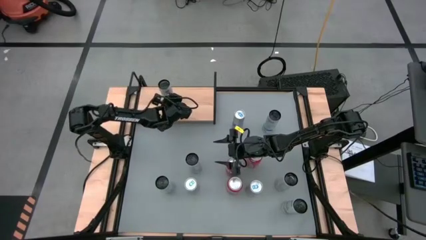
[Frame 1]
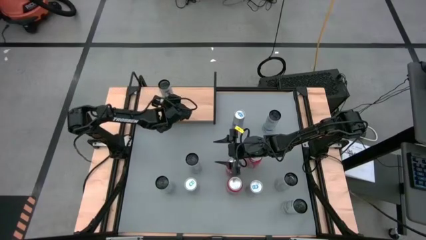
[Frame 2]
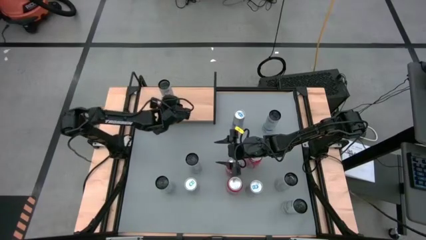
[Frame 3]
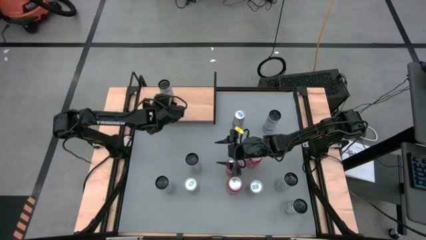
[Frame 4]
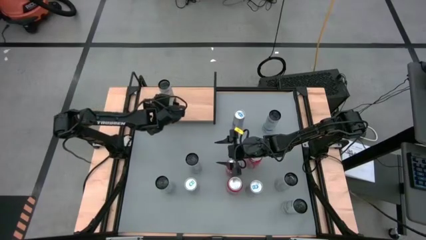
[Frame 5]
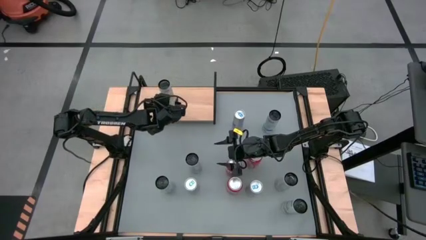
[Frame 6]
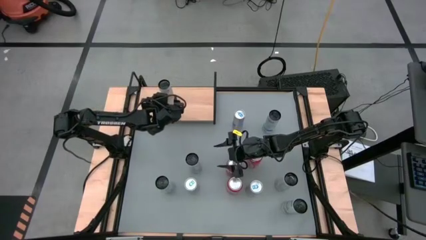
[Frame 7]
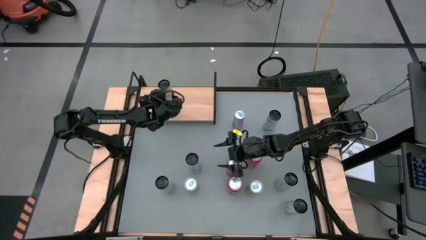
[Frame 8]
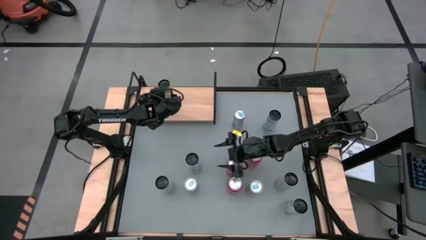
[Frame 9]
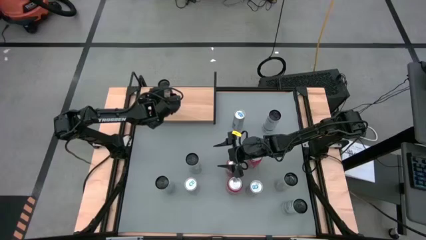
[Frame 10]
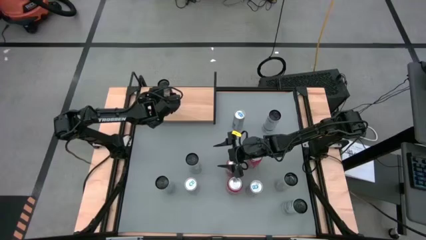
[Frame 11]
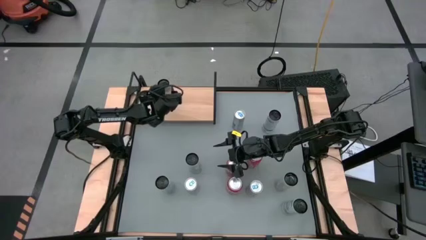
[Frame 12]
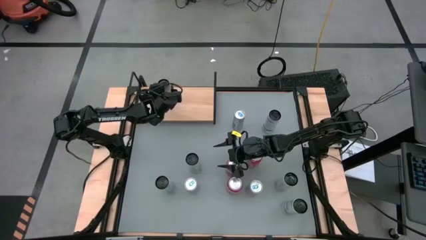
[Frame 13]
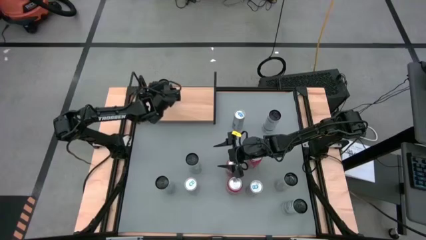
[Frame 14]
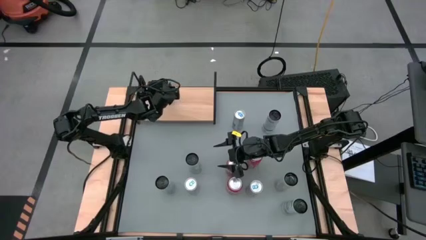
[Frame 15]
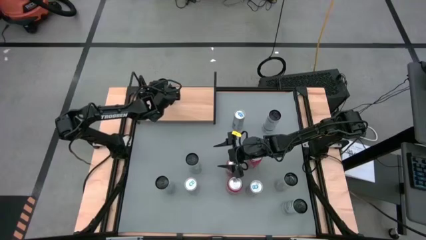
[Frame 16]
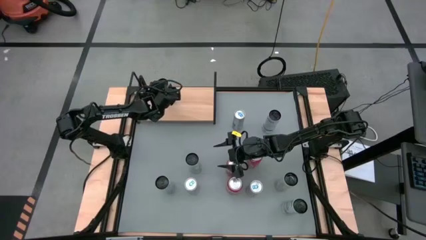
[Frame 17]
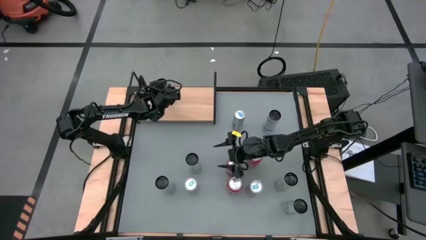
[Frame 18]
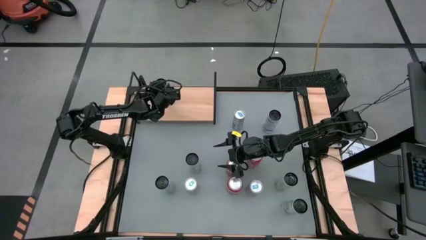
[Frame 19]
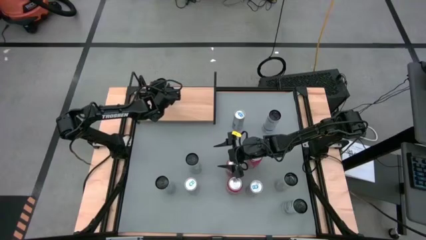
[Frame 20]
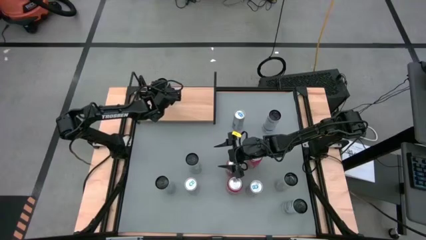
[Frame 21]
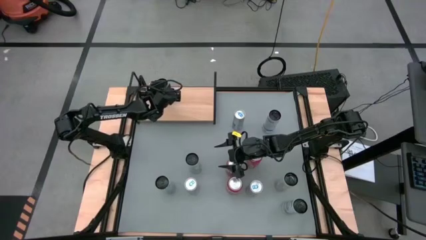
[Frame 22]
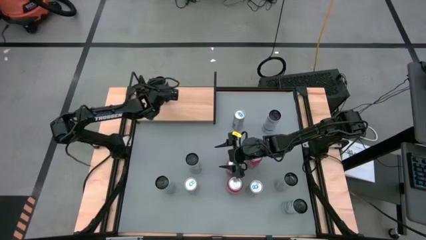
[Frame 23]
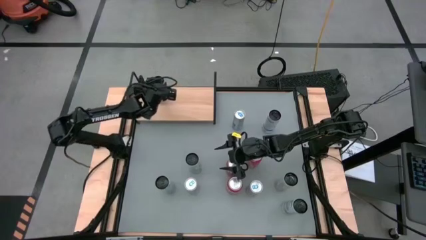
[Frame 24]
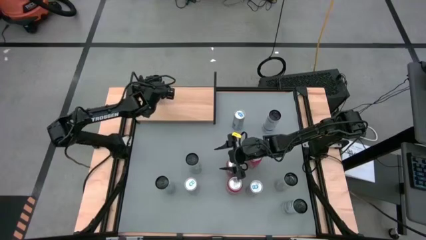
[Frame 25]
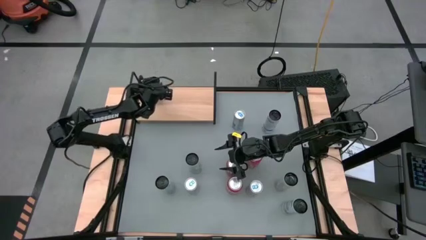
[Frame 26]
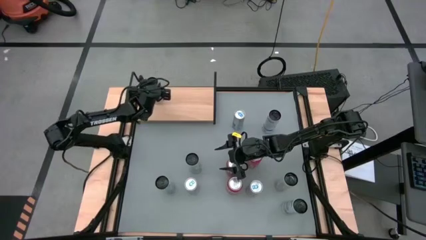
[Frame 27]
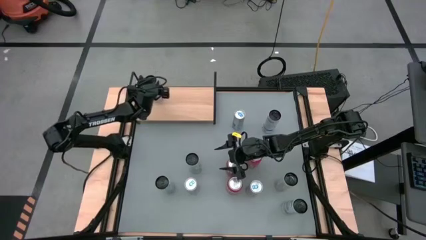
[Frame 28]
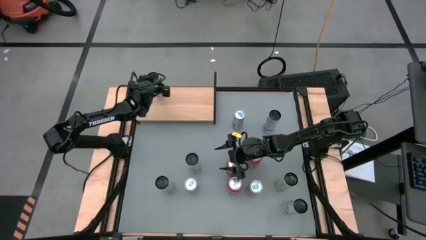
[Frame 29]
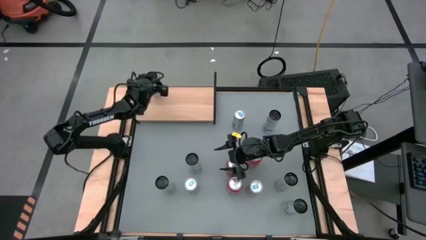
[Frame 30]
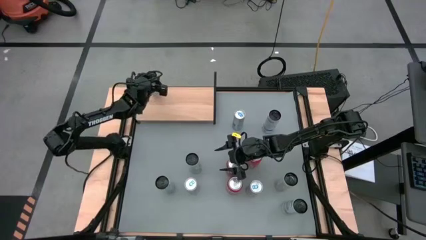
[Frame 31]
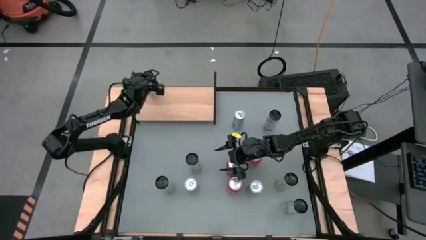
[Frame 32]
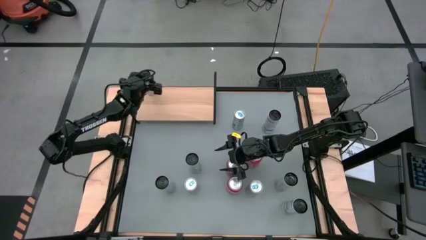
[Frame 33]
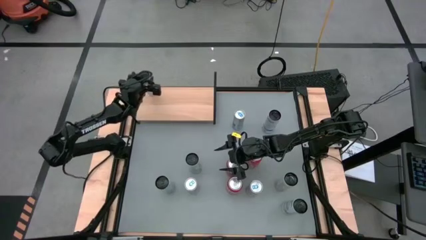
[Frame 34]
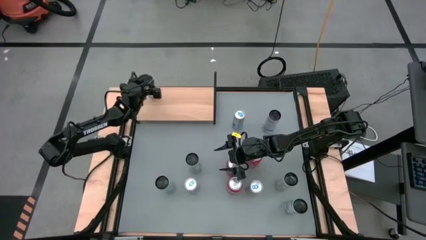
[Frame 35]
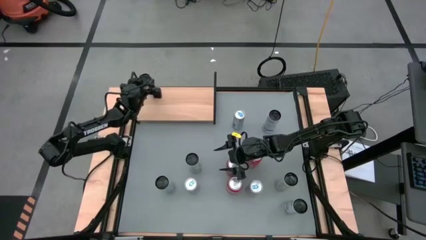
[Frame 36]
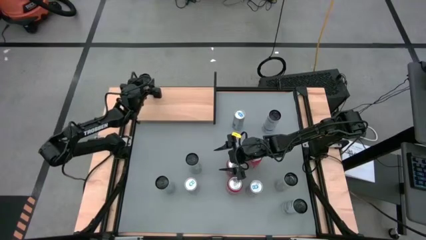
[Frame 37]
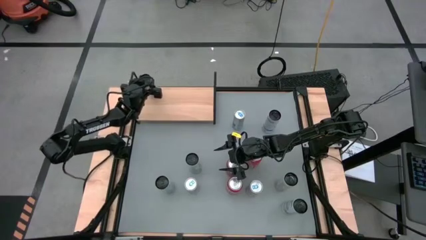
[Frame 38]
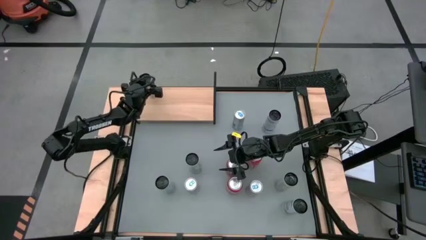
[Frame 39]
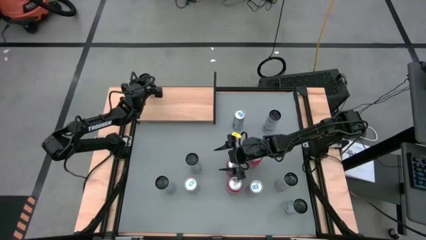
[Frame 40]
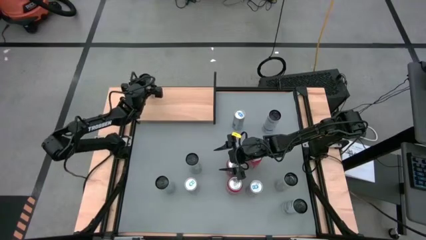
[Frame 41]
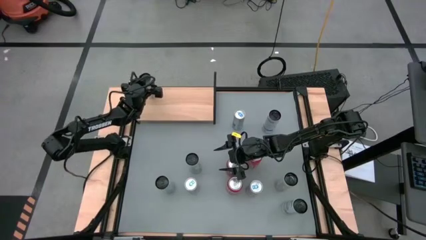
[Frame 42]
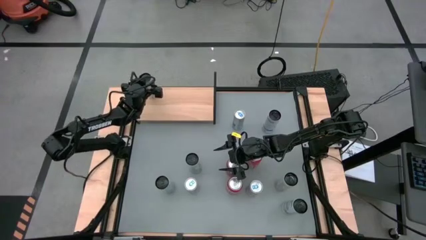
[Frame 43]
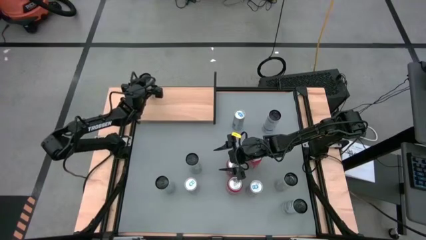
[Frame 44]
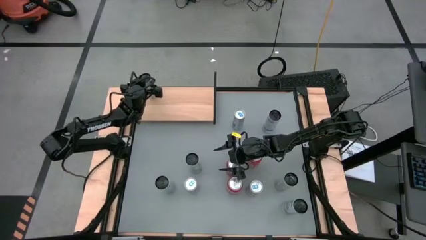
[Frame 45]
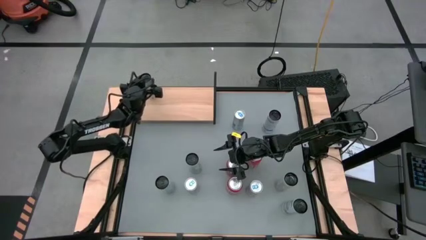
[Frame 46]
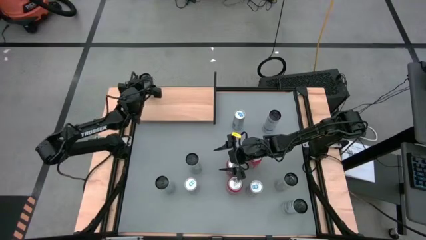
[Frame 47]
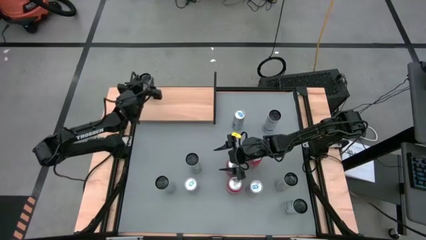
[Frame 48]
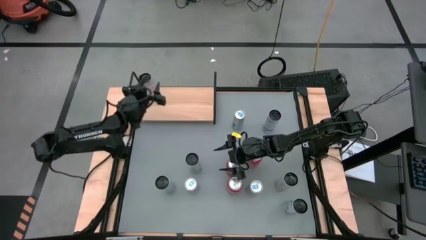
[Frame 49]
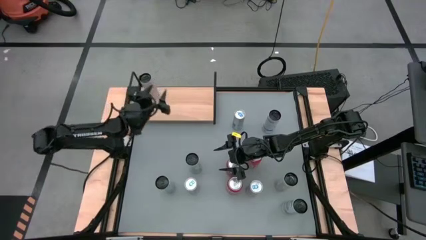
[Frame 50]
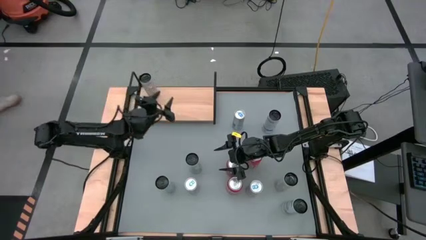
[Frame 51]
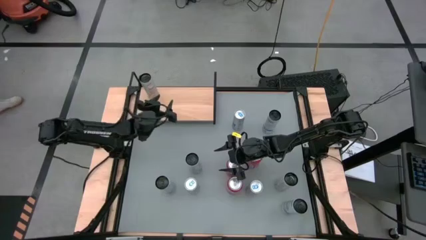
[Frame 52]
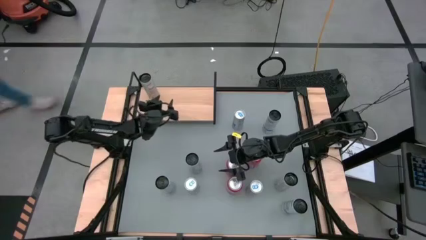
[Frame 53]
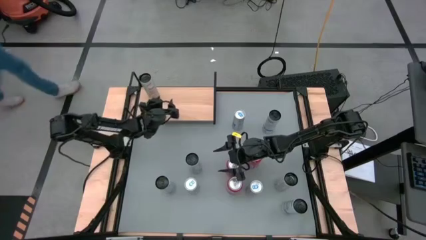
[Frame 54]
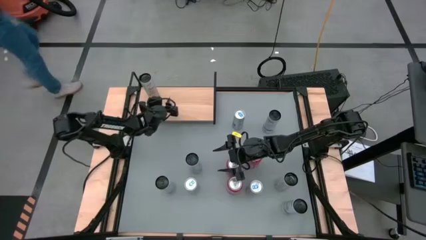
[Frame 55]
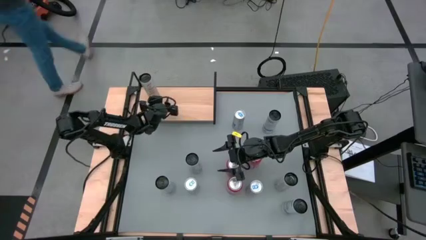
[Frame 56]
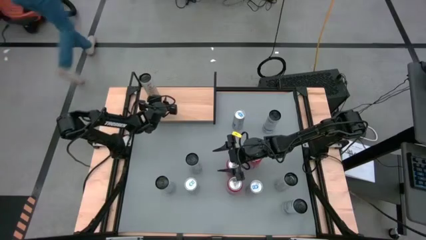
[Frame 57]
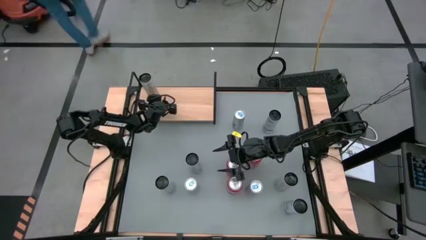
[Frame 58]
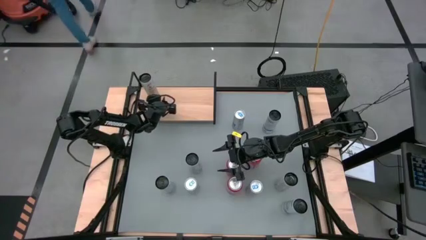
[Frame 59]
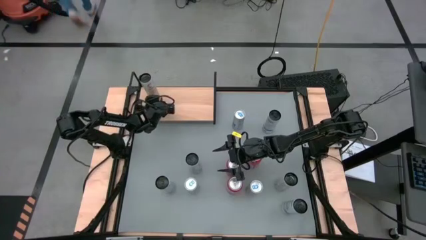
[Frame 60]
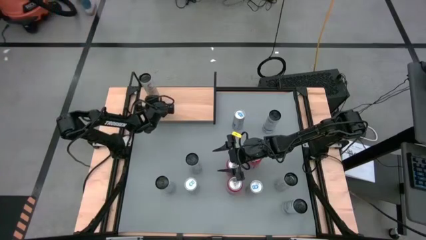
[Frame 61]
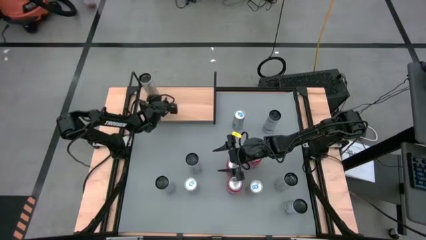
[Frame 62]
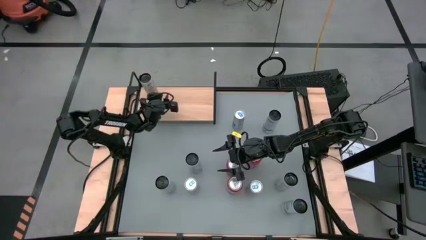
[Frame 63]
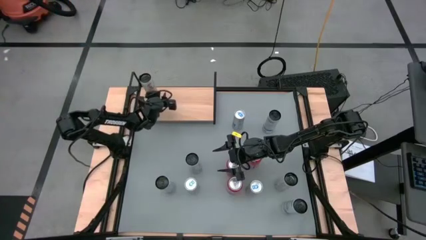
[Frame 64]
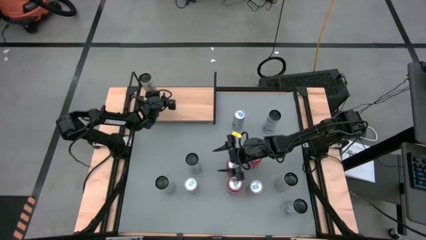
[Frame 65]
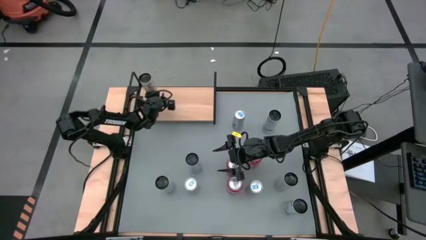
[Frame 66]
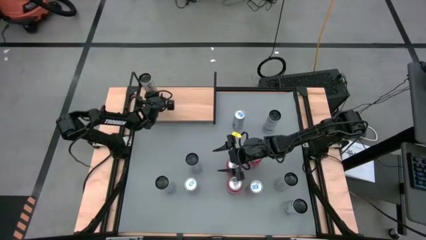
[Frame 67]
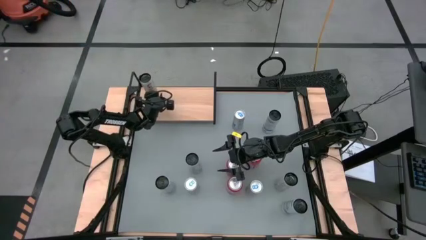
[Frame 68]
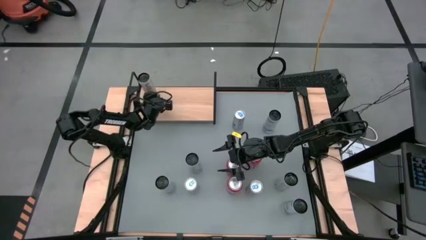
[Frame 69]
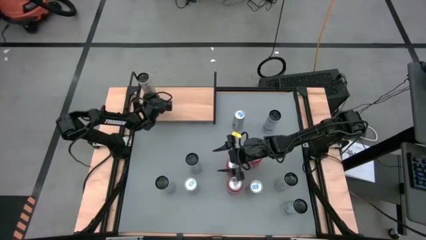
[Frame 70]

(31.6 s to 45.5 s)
Task: Place canned beverage on shelf
Put the top left white-yellow soda can on the shelf
